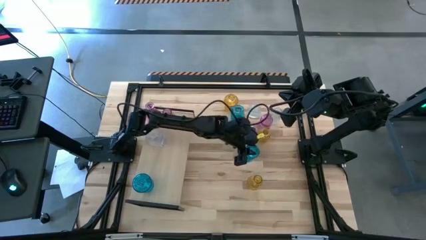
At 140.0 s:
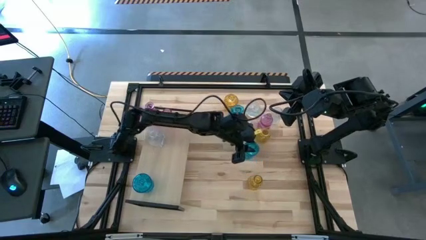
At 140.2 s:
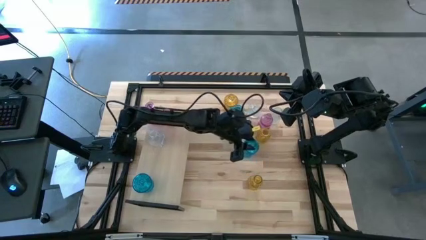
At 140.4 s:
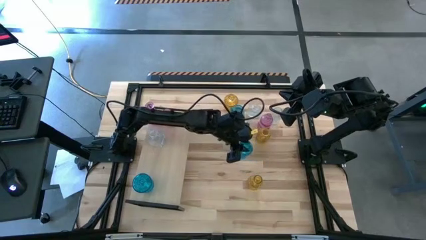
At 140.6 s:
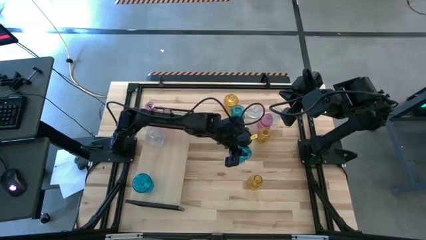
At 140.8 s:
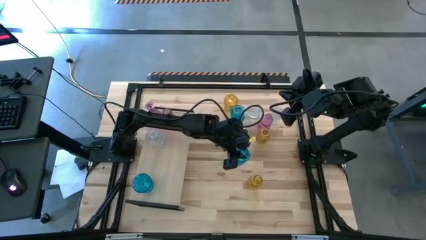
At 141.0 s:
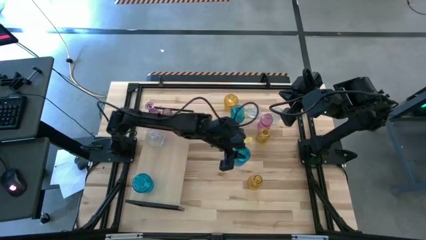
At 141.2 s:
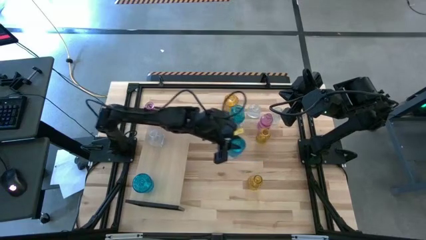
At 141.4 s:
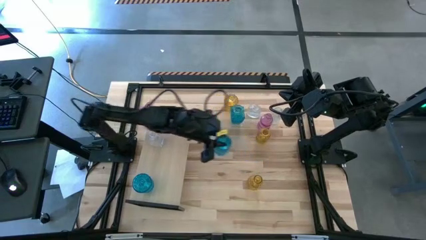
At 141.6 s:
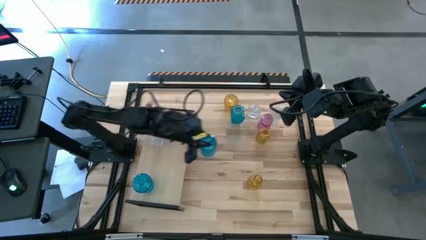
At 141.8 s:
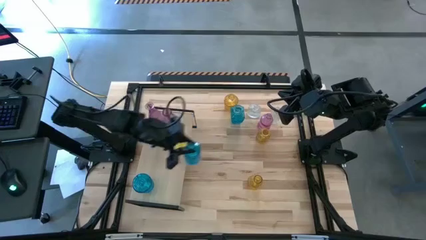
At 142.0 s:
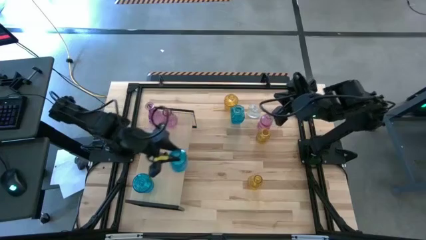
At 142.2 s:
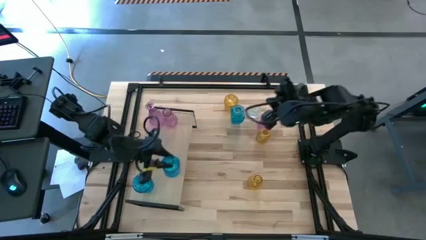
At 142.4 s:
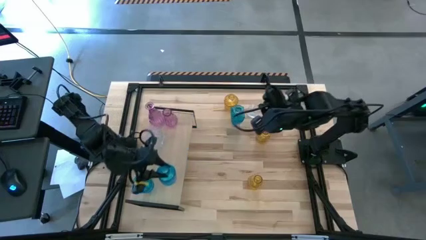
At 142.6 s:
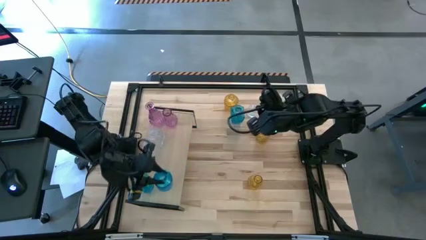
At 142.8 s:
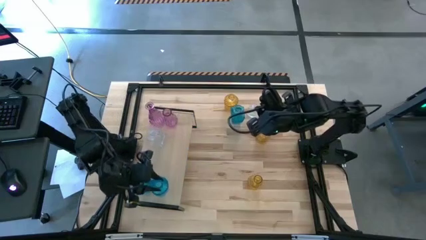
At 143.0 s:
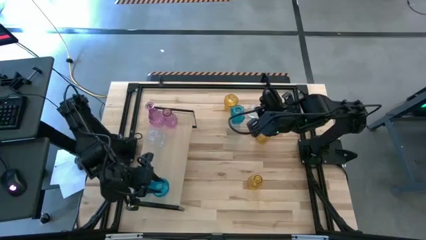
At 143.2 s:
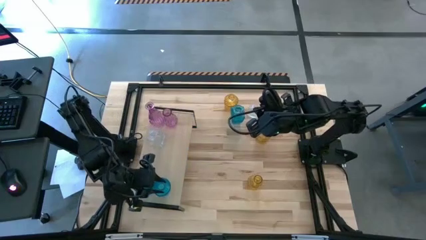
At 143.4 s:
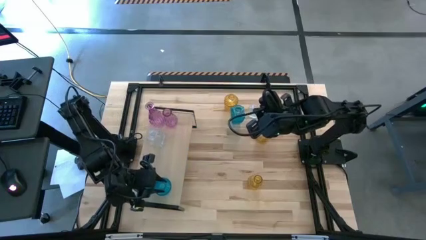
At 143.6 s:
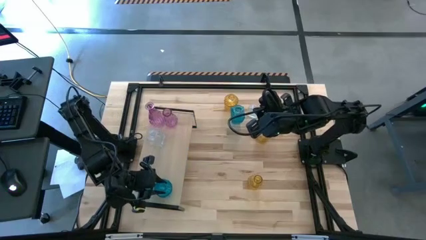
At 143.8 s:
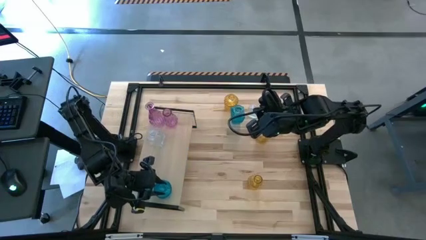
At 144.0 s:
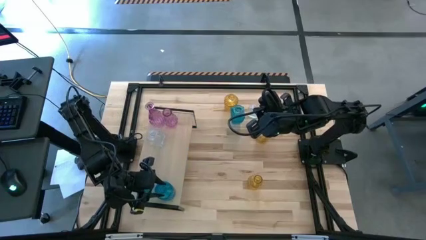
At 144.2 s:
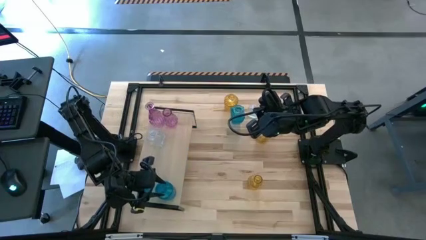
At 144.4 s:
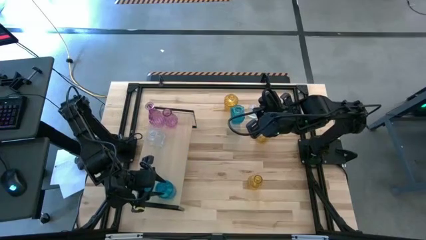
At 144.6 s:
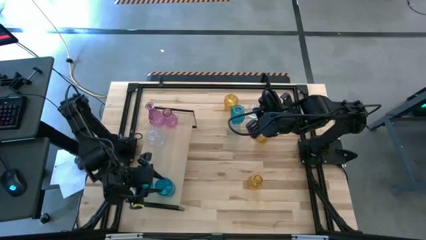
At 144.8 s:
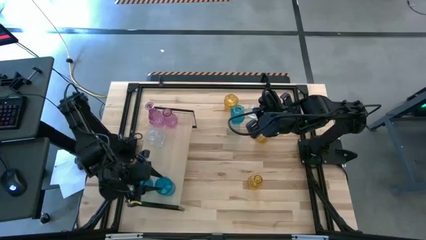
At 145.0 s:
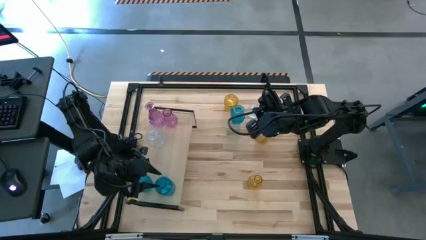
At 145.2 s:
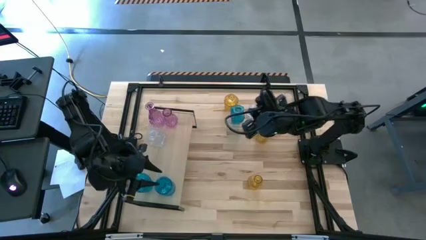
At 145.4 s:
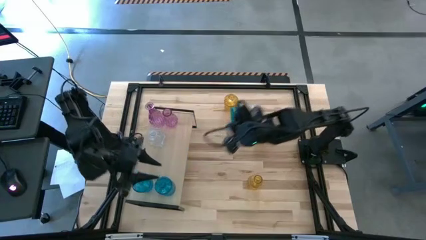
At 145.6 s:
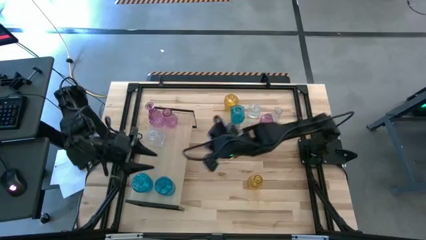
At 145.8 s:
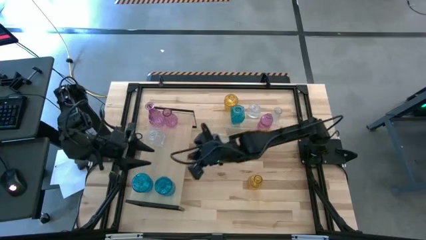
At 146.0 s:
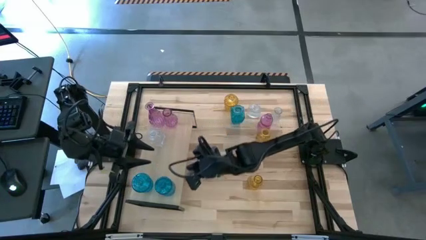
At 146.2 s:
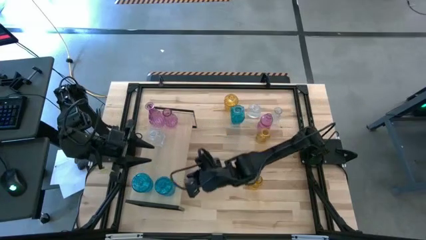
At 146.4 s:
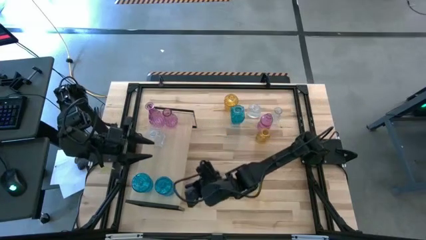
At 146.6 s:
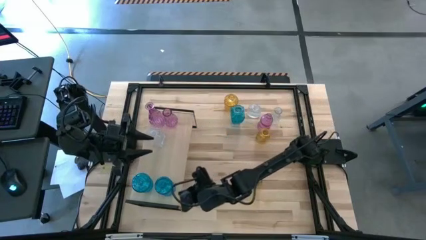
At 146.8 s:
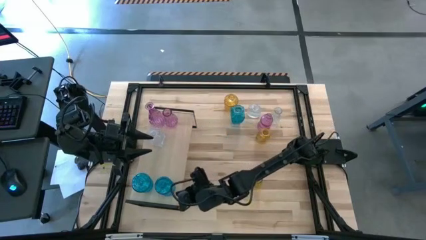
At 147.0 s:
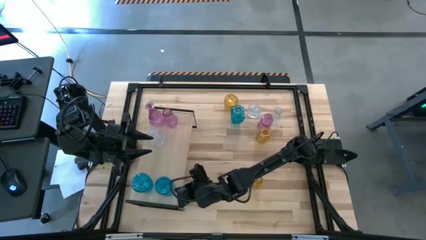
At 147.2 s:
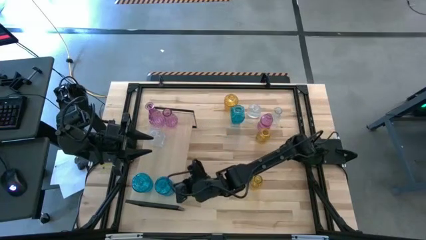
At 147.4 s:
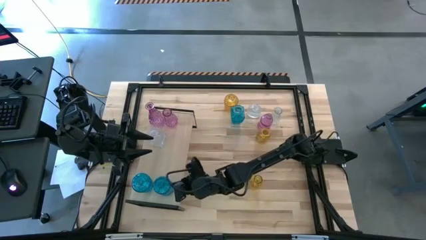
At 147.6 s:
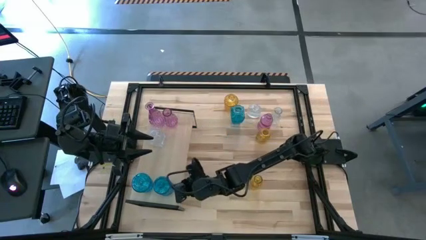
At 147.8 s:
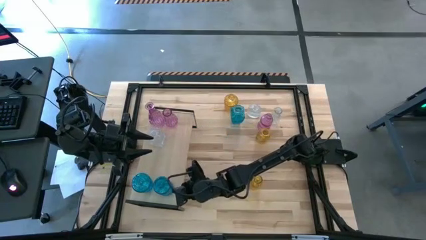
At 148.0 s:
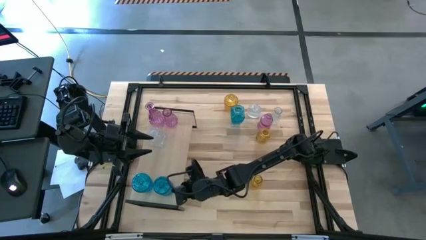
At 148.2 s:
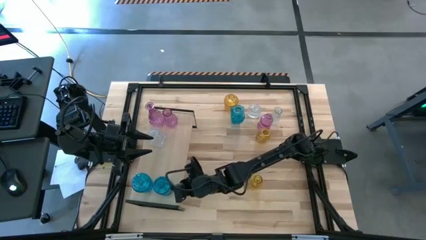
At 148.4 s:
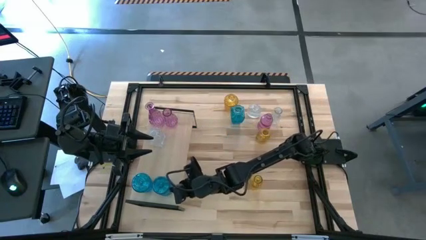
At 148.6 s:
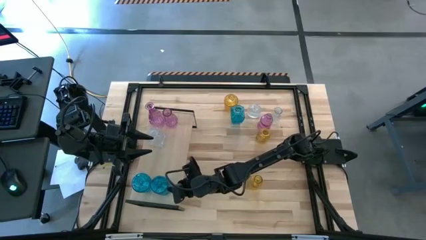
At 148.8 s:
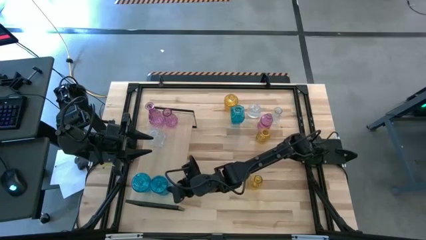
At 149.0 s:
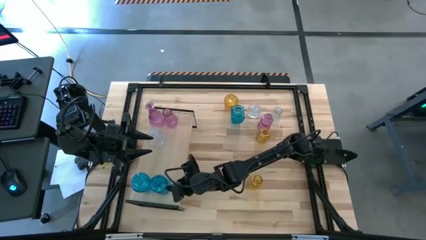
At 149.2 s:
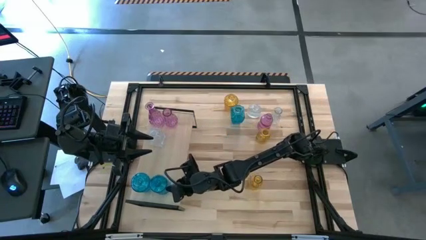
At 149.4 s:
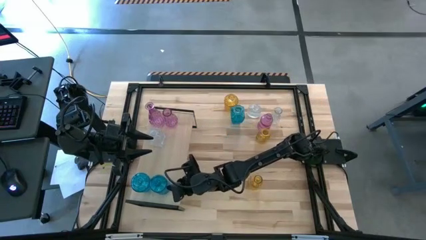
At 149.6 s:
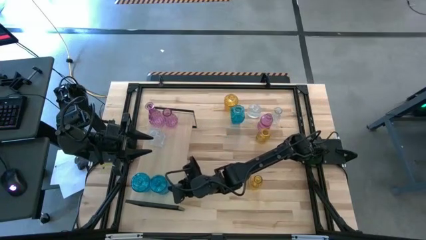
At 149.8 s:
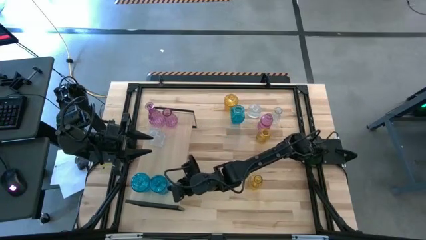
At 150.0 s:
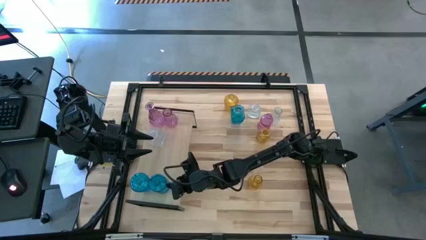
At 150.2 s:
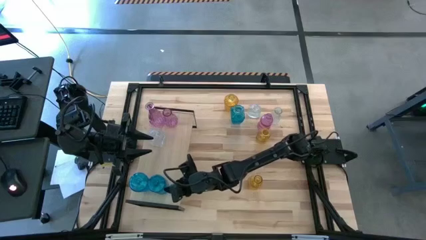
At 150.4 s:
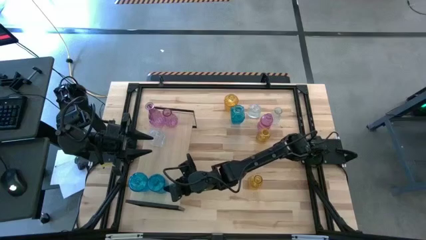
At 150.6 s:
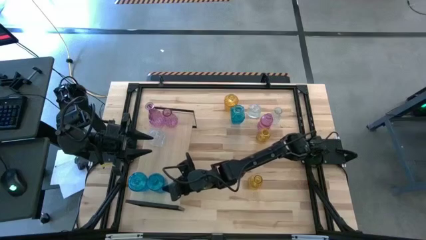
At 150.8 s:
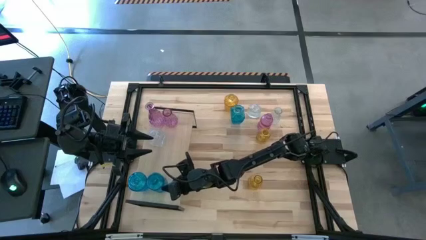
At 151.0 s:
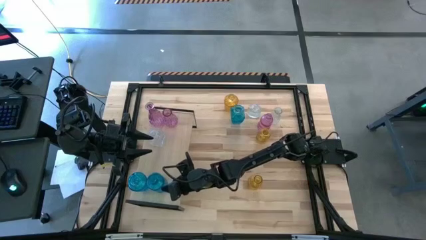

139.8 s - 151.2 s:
Task: sort vases onto shelf
Put the bottom blue flower vase on the shelf
